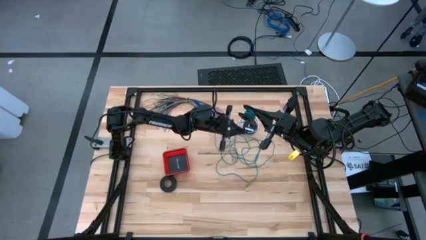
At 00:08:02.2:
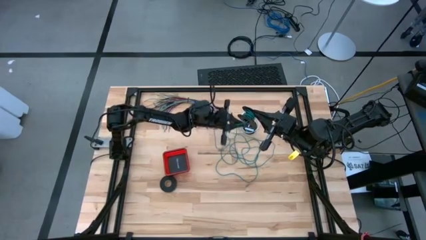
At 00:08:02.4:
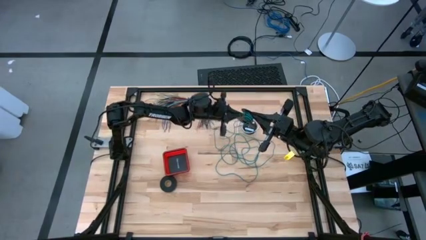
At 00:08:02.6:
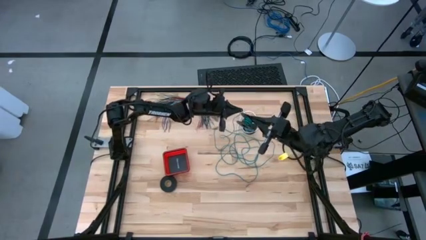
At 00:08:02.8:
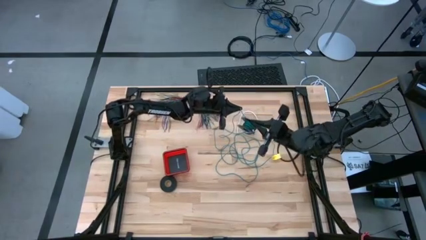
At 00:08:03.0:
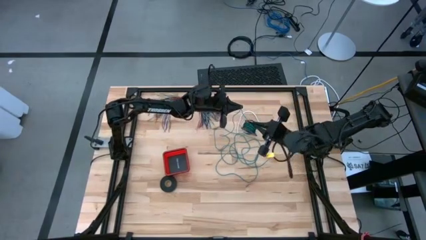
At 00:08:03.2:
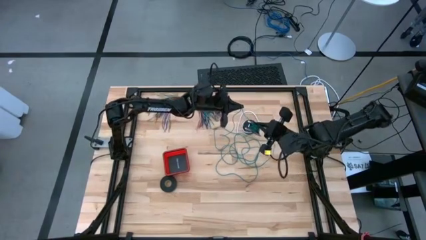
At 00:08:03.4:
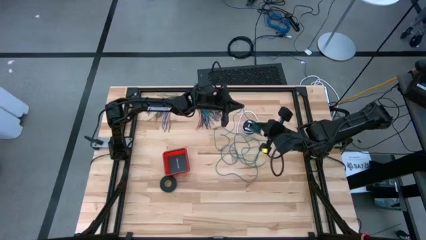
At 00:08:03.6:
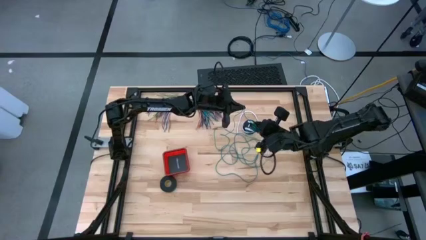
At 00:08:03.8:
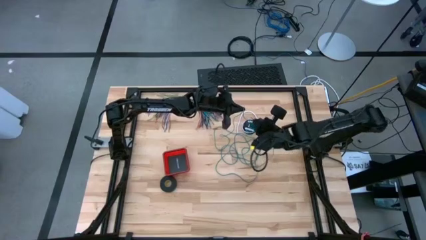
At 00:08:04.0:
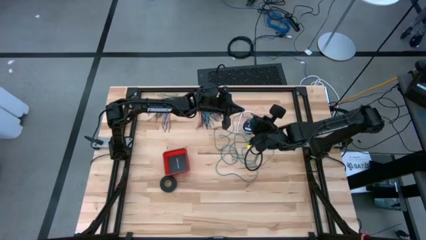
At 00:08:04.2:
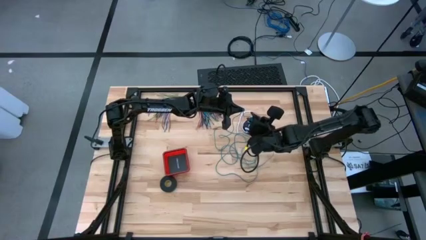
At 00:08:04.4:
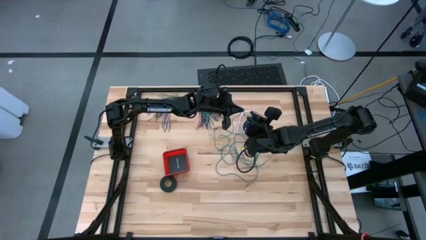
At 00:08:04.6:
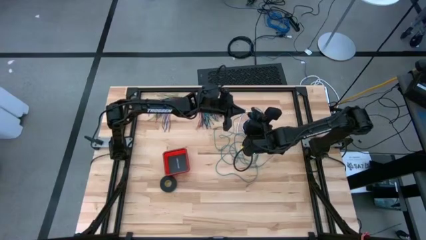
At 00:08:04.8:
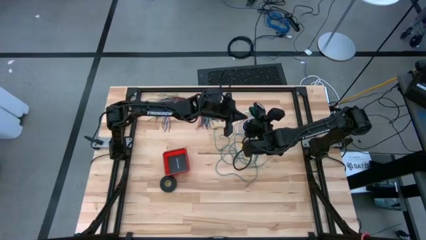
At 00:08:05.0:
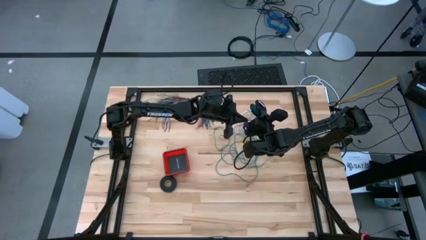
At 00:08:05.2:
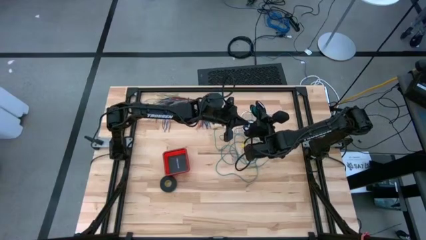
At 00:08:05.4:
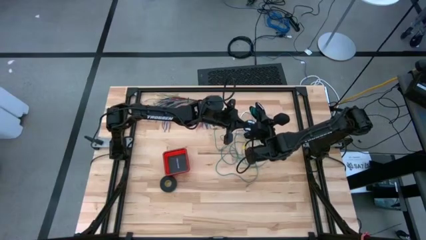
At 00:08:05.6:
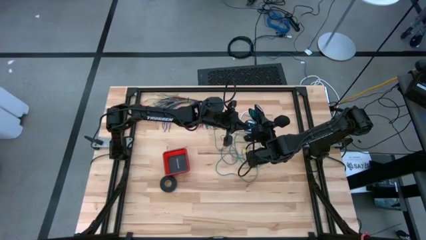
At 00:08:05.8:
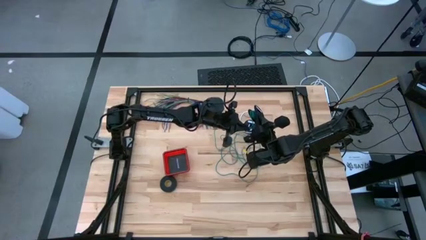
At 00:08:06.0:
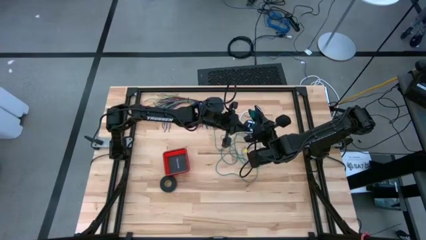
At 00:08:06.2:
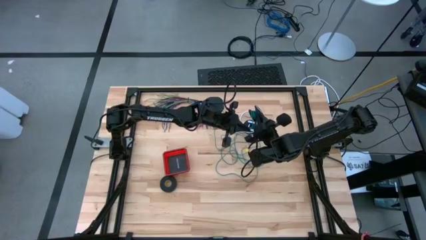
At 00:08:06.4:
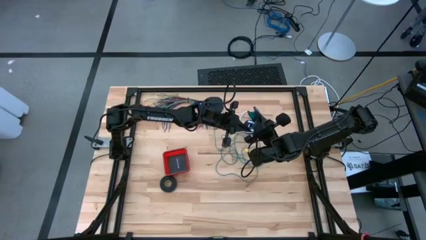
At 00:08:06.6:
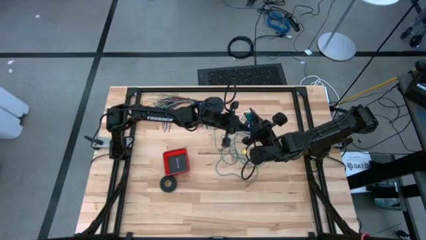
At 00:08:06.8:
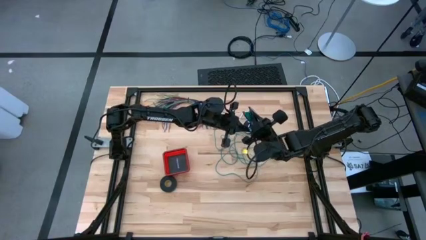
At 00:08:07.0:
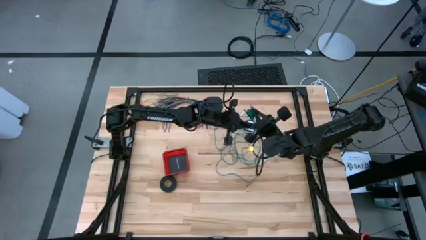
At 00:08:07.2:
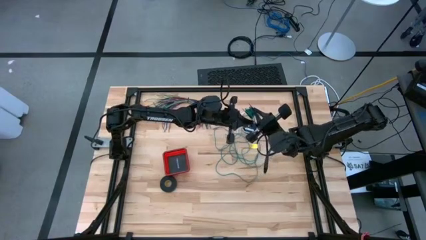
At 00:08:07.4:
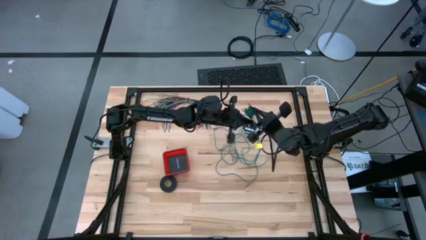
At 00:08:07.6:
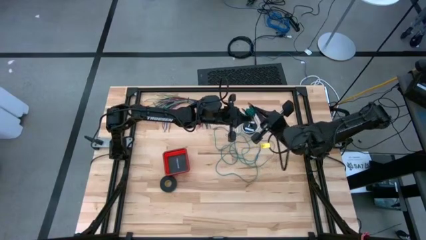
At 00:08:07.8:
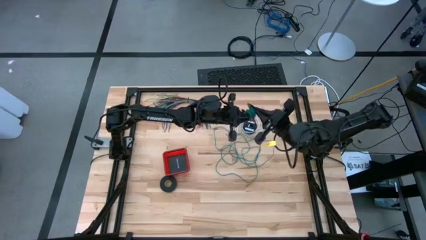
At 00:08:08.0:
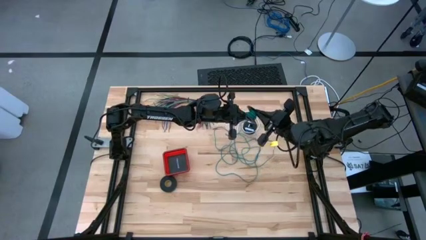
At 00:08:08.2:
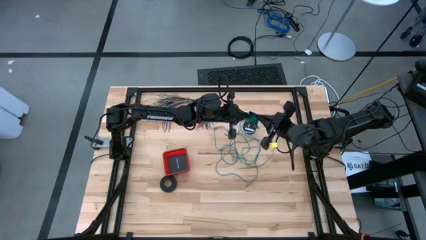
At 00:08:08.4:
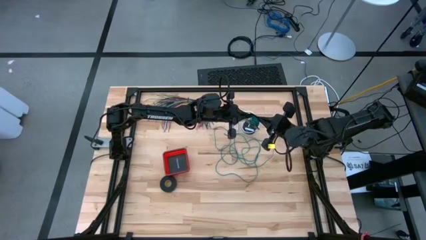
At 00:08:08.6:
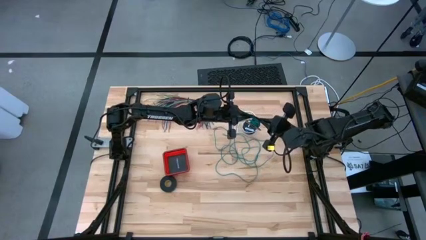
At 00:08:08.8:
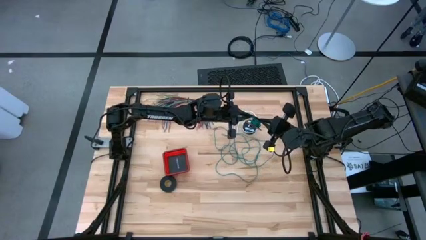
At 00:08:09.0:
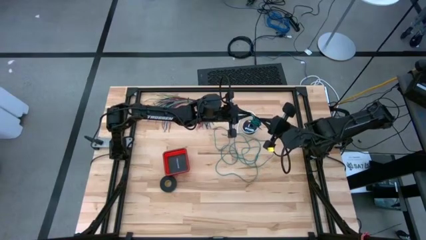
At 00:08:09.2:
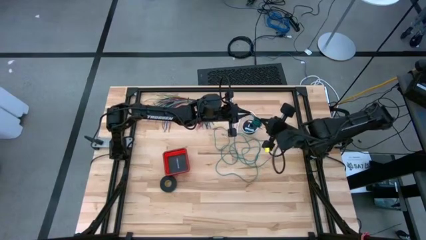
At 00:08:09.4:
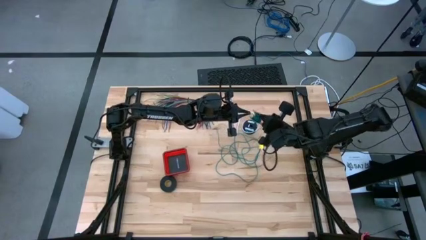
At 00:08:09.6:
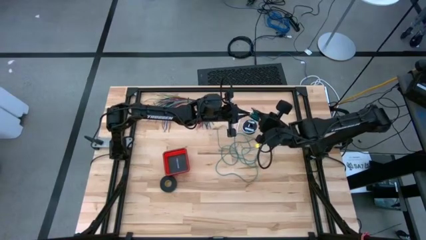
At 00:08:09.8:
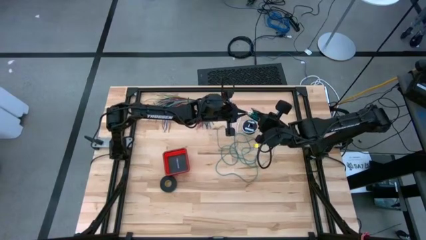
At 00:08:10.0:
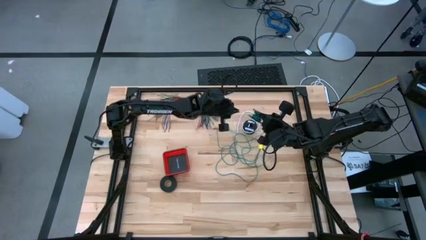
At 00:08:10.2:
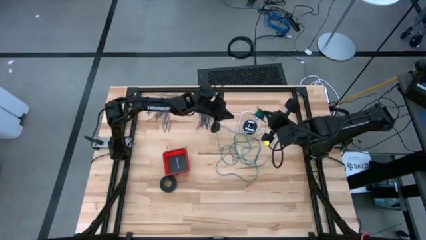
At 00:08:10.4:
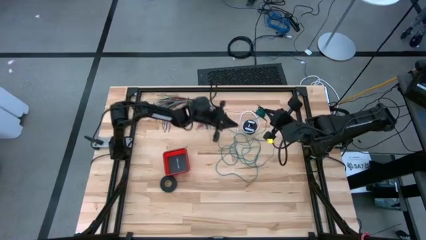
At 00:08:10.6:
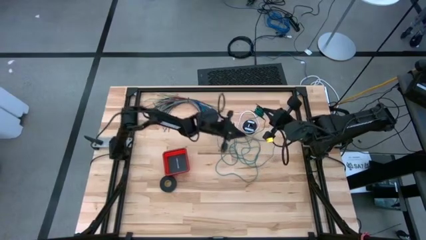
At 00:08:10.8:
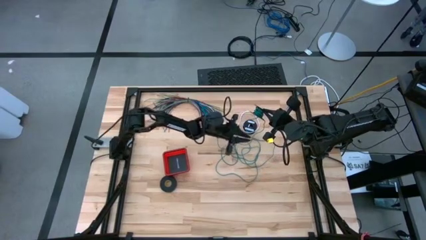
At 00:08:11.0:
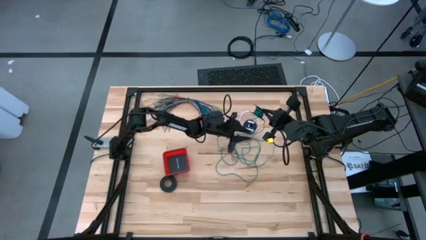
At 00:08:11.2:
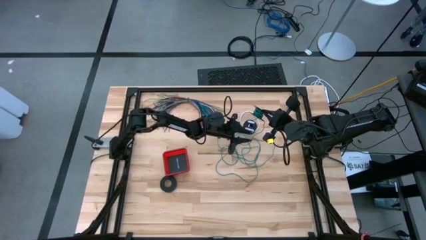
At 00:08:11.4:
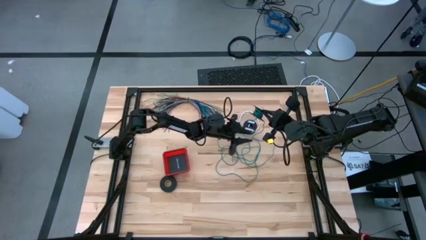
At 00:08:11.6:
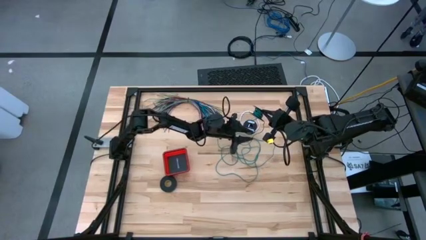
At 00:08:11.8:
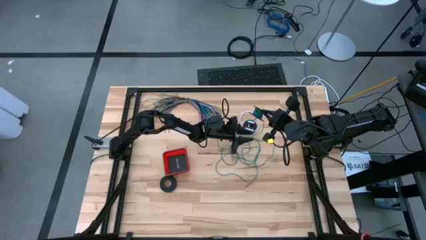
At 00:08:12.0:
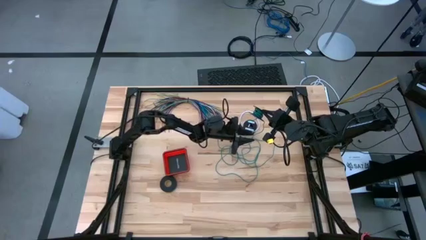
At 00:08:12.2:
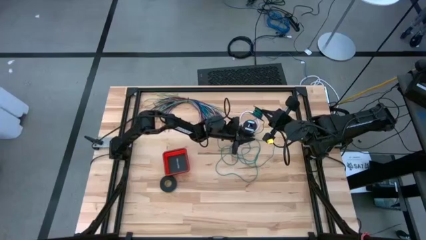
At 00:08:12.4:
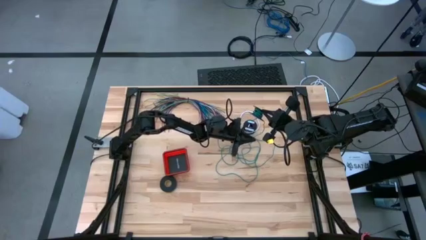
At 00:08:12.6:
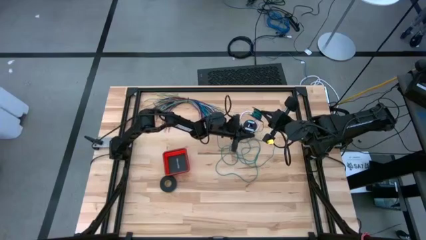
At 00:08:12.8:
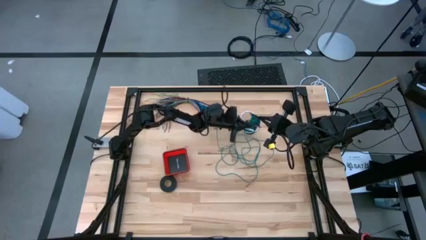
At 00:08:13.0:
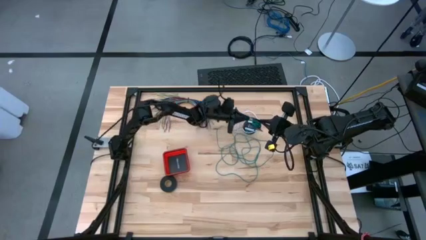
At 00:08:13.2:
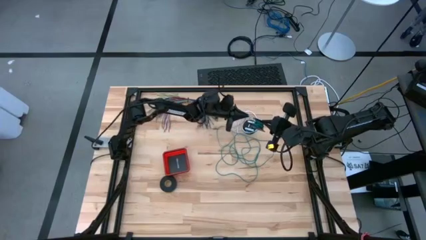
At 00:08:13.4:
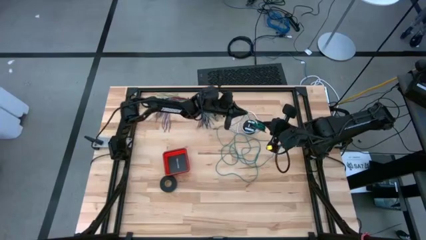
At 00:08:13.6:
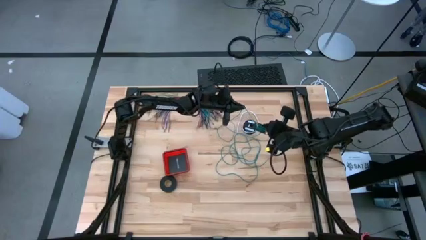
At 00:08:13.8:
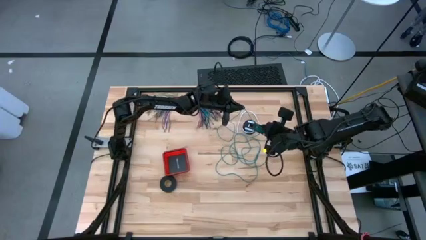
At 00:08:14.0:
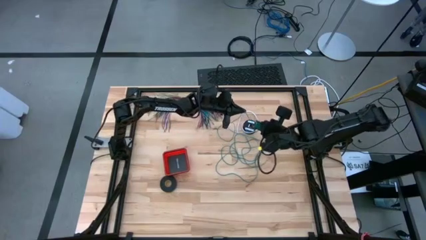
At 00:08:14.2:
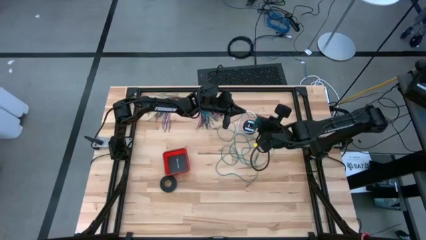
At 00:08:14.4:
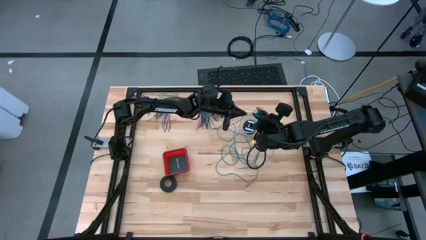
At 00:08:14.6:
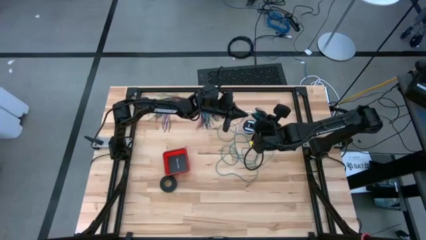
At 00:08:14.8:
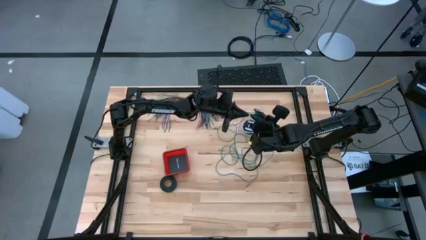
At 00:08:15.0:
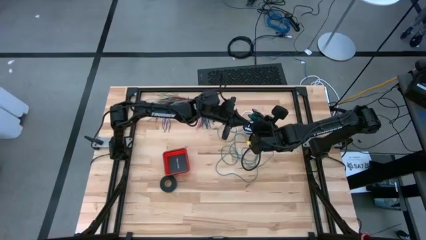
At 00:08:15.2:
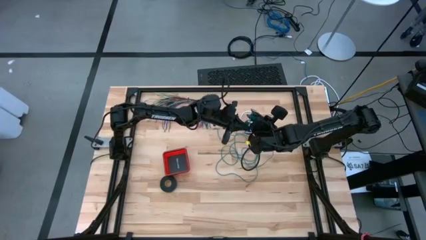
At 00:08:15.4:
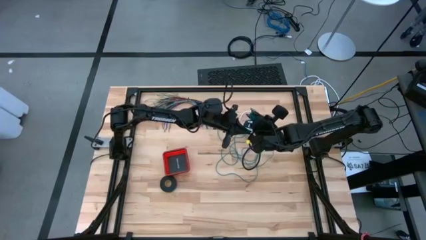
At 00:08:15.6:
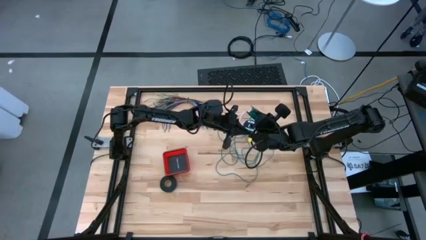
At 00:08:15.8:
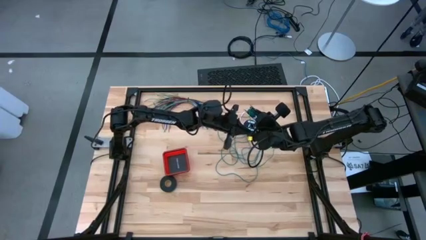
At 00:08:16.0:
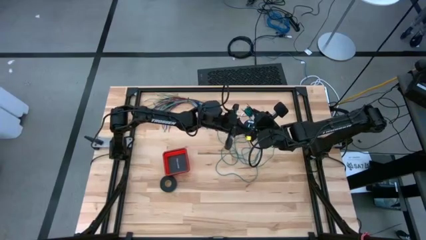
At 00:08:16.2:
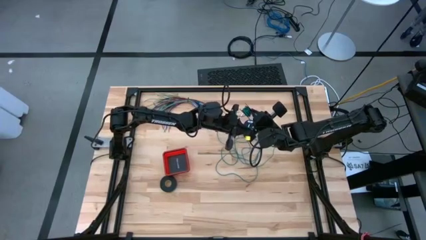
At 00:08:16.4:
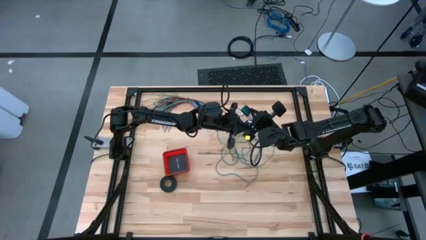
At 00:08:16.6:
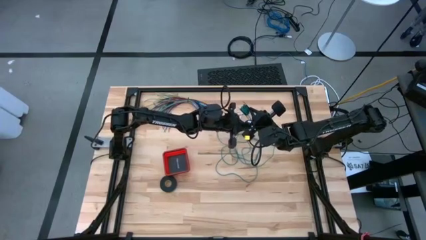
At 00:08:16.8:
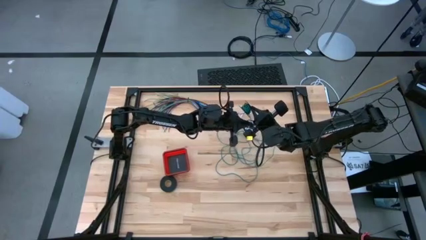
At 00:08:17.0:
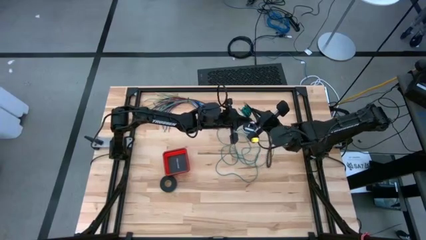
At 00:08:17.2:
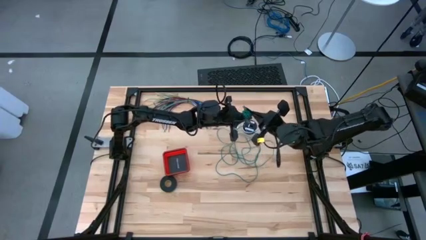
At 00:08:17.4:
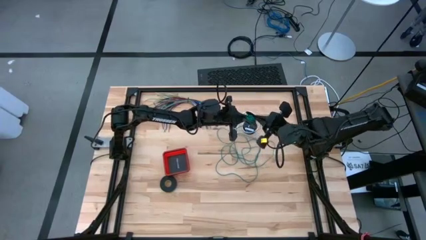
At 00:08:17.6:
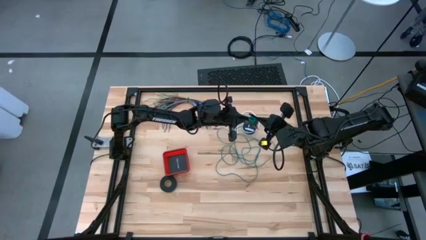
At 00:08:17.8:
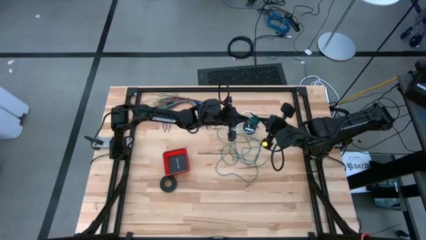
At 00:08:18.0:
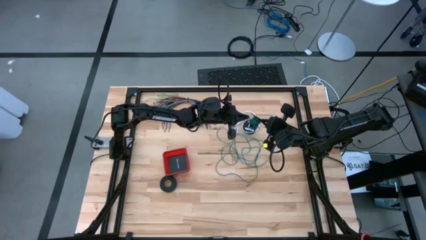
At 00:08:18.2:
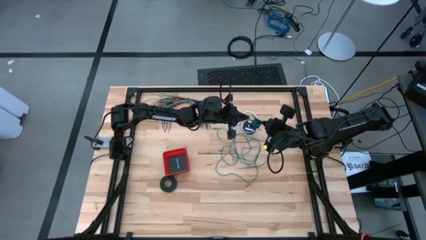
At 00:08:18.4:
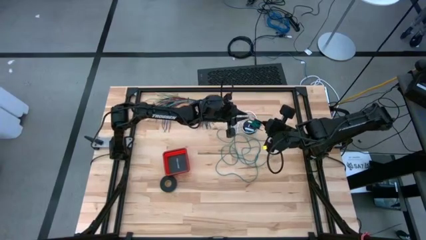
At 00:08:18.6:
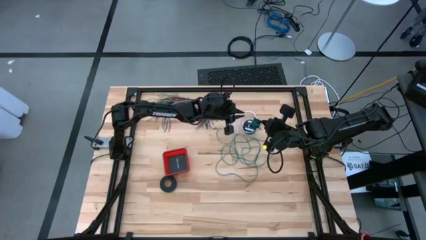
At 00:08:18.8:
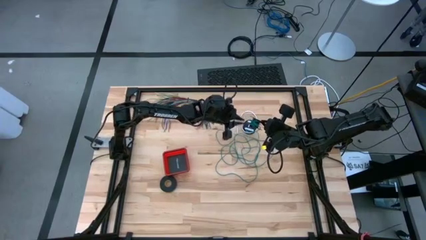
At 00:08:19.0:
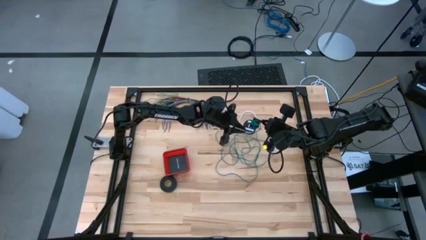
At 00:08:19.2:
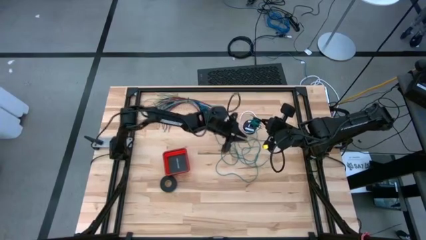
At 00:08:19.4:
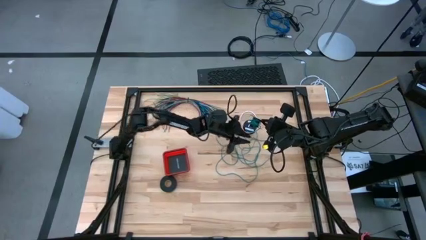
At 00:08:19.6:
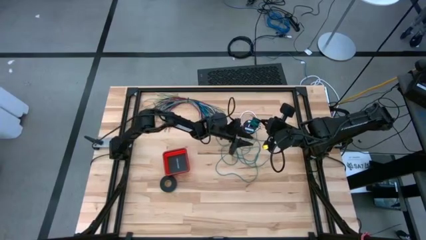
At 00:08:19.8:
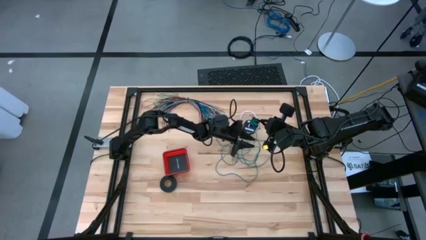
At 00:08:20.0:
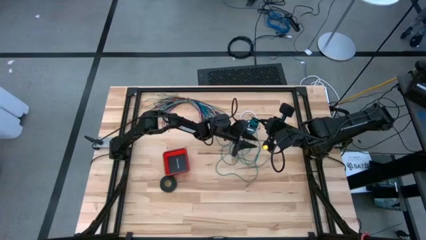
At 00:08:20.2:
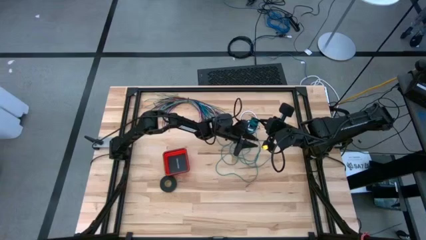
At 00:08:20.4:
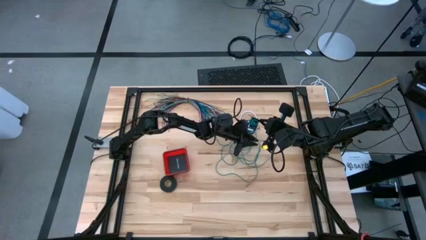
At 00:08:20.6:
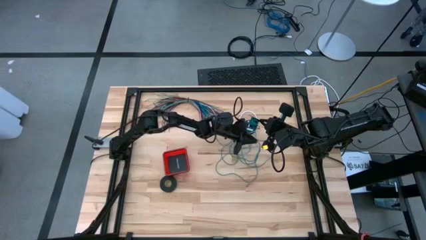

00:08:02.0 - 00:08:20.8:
Task: Coil cords
Coil the green wire onto the spool
